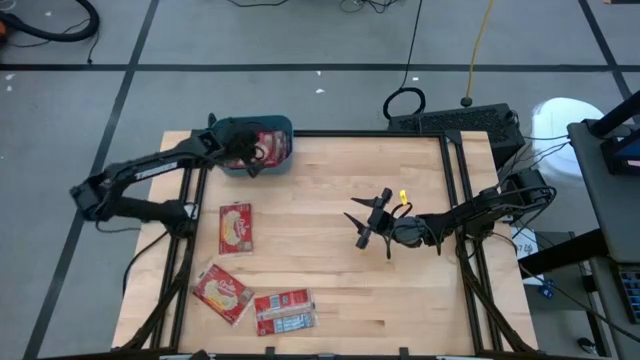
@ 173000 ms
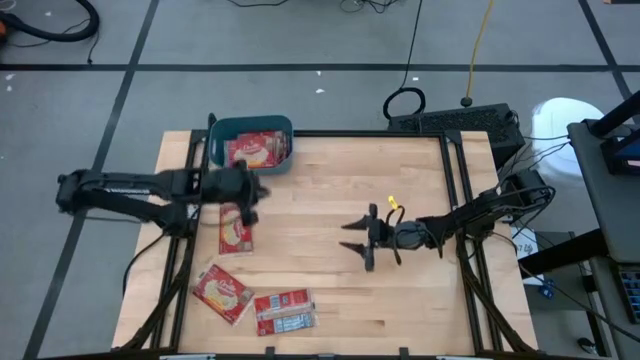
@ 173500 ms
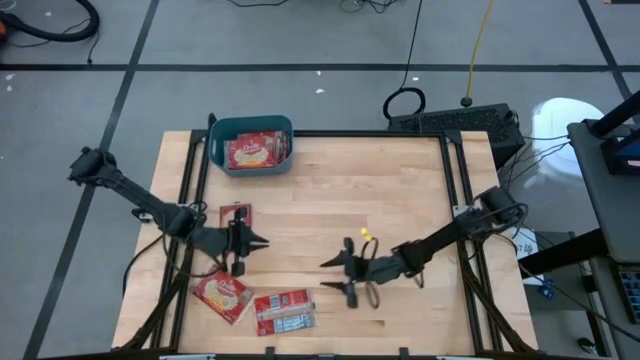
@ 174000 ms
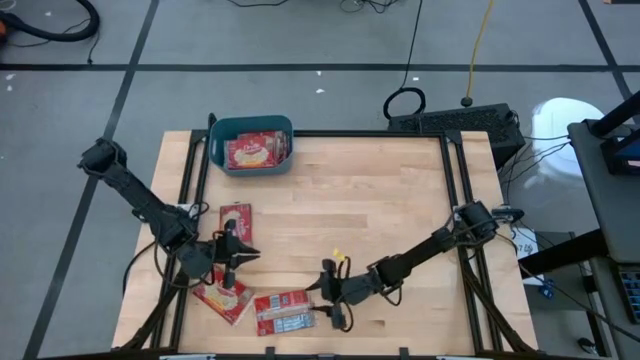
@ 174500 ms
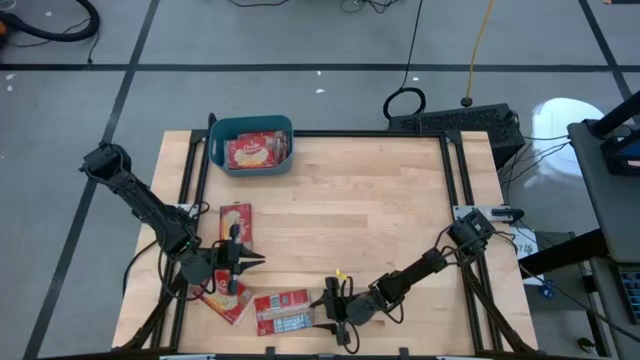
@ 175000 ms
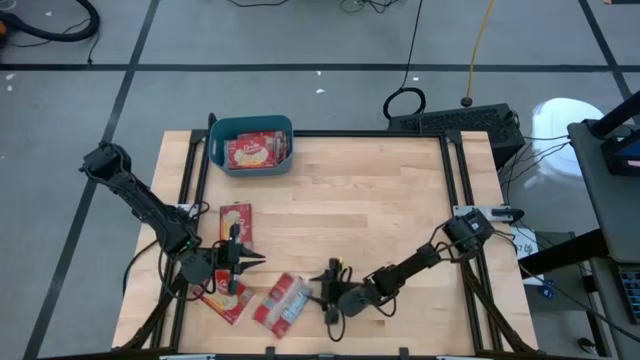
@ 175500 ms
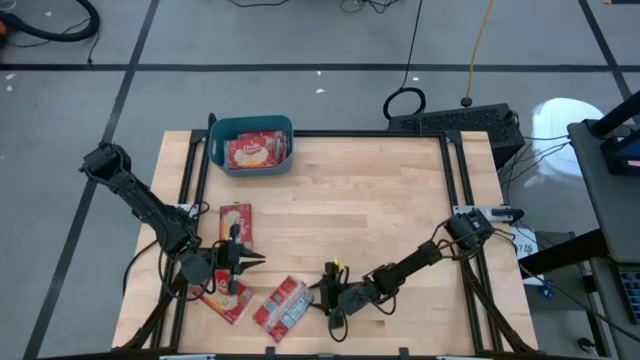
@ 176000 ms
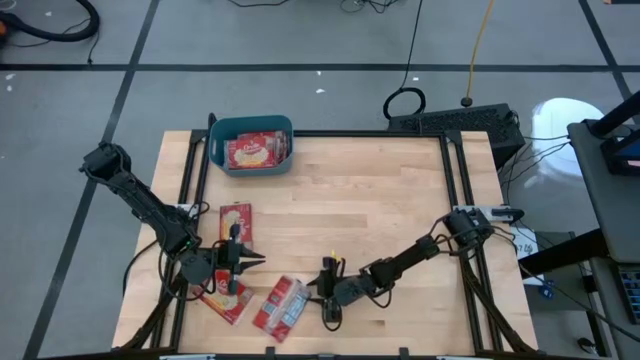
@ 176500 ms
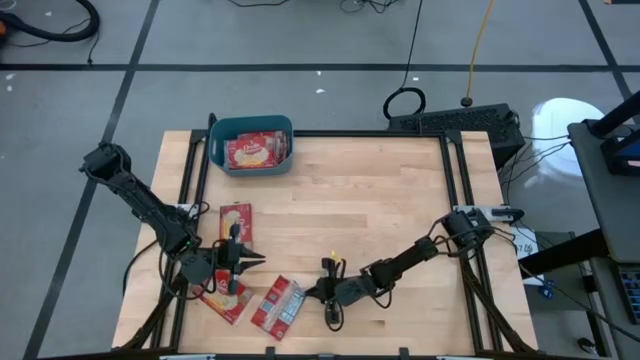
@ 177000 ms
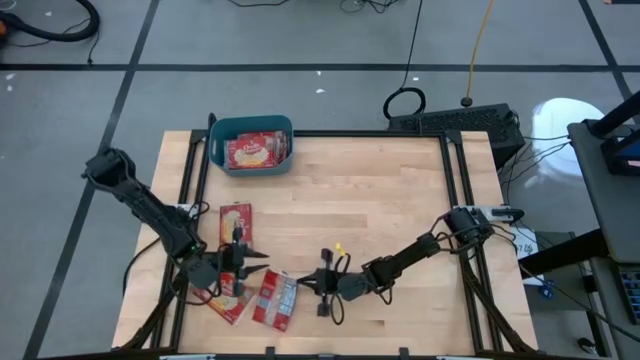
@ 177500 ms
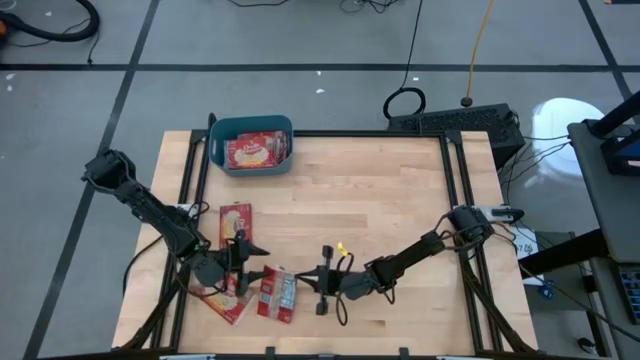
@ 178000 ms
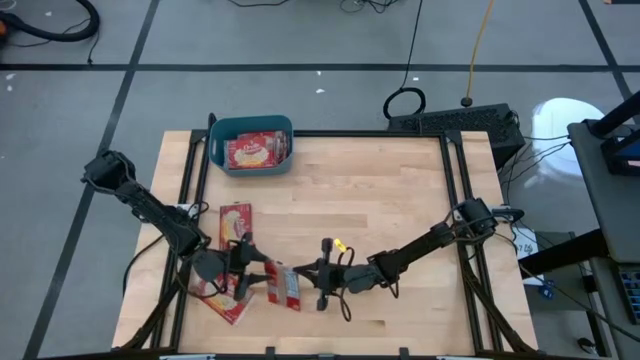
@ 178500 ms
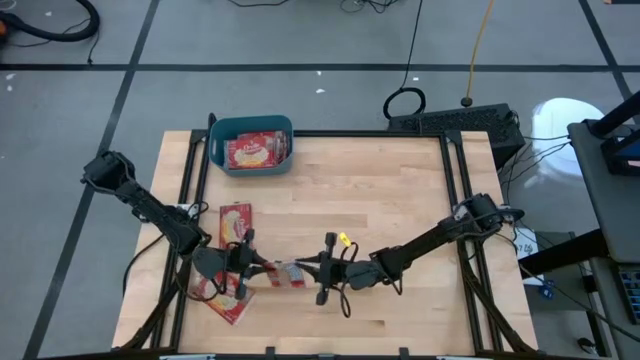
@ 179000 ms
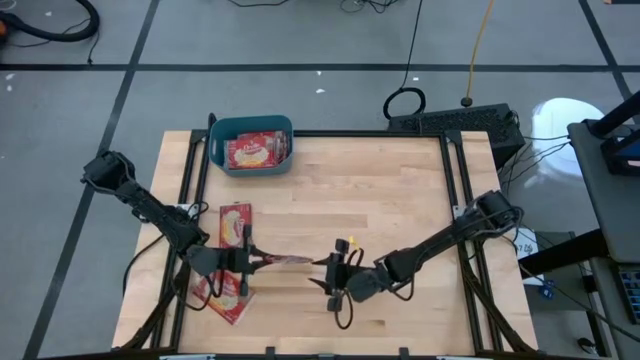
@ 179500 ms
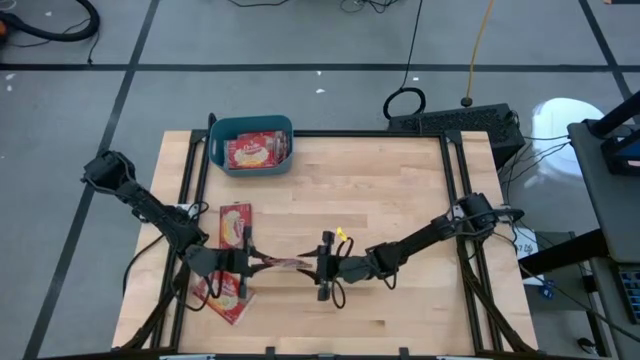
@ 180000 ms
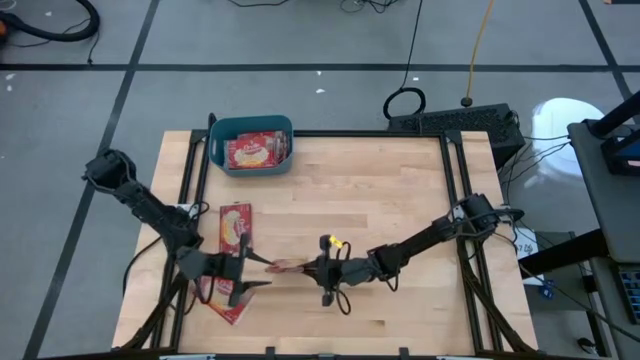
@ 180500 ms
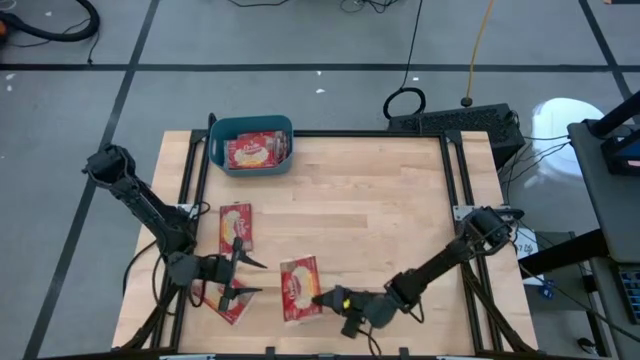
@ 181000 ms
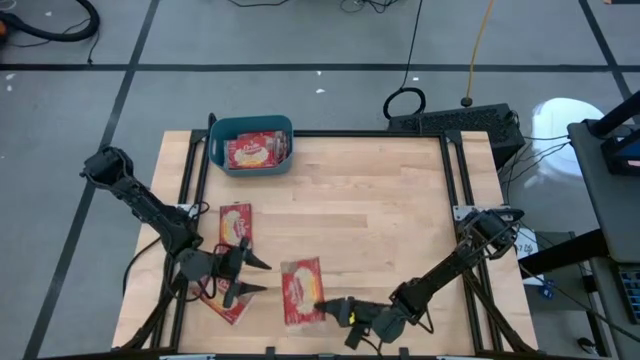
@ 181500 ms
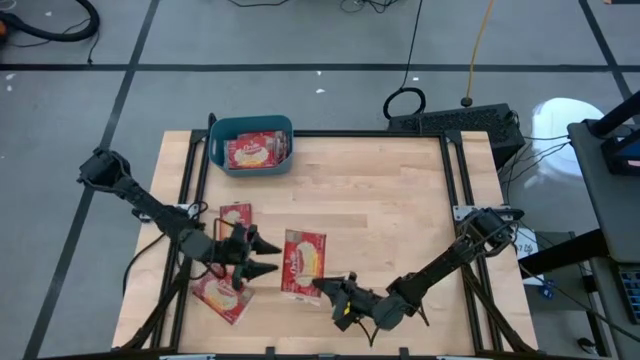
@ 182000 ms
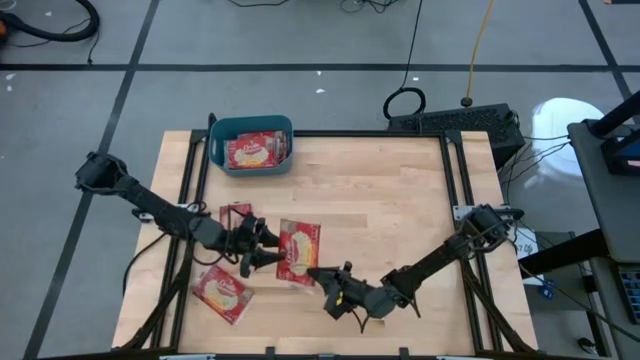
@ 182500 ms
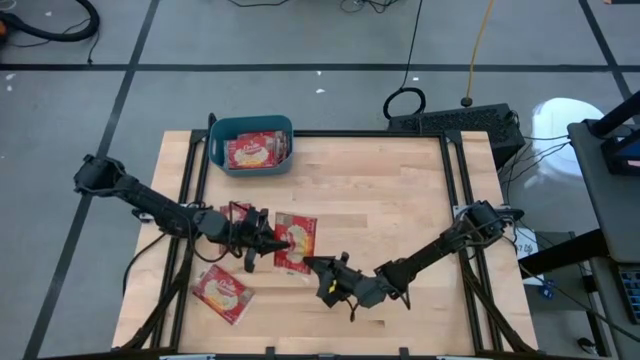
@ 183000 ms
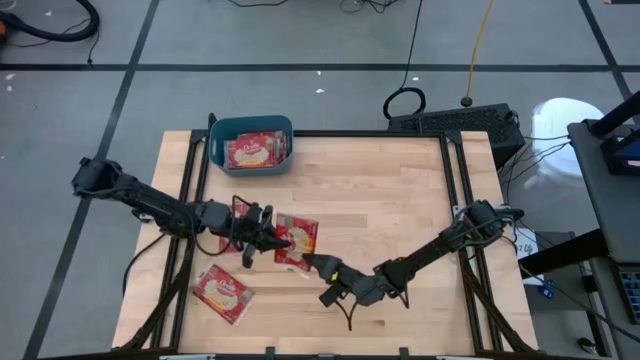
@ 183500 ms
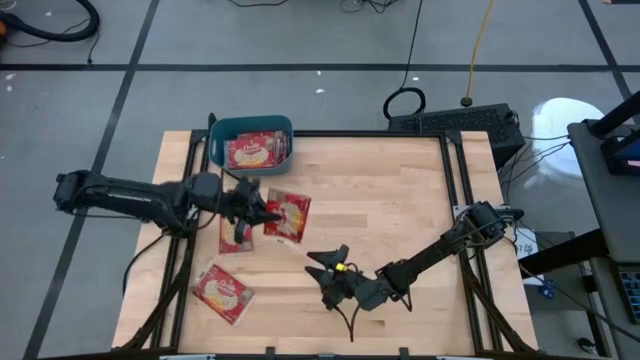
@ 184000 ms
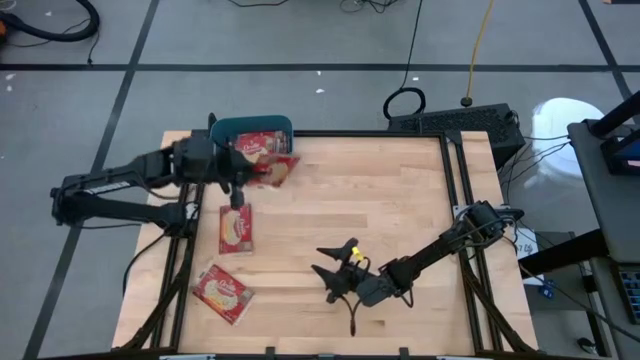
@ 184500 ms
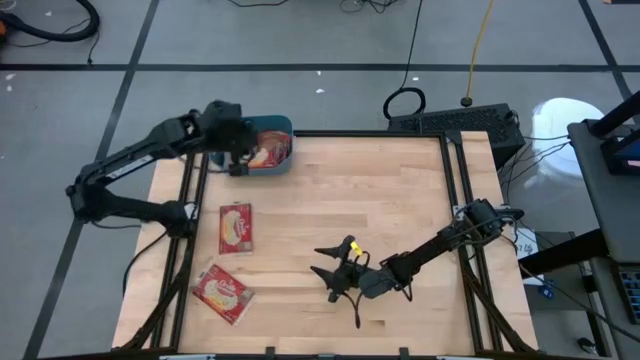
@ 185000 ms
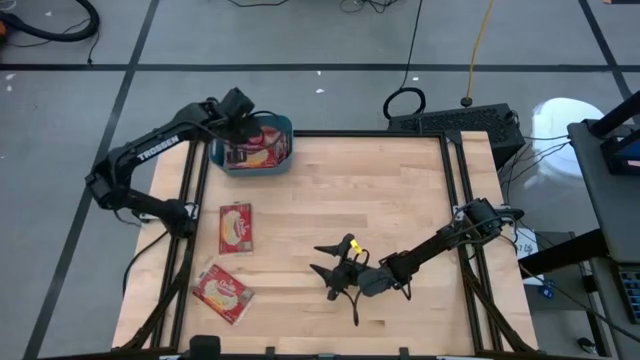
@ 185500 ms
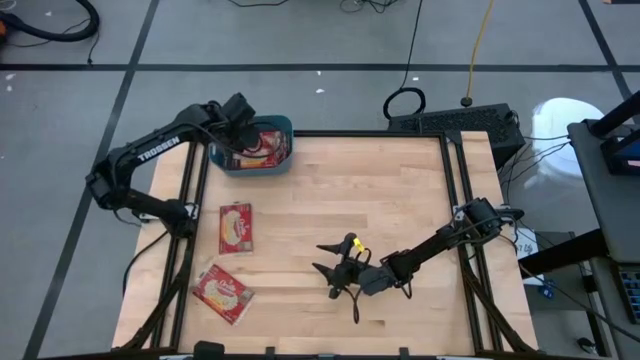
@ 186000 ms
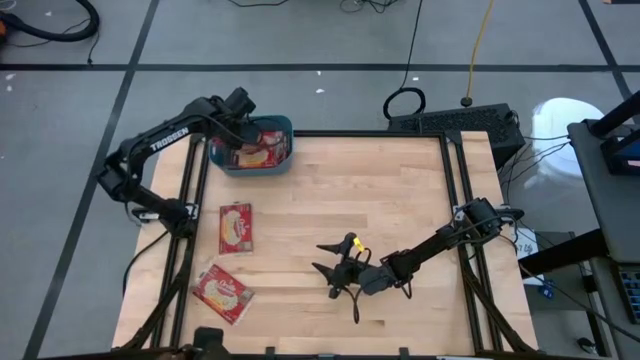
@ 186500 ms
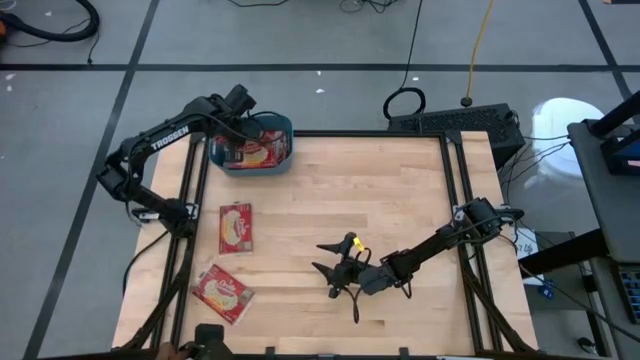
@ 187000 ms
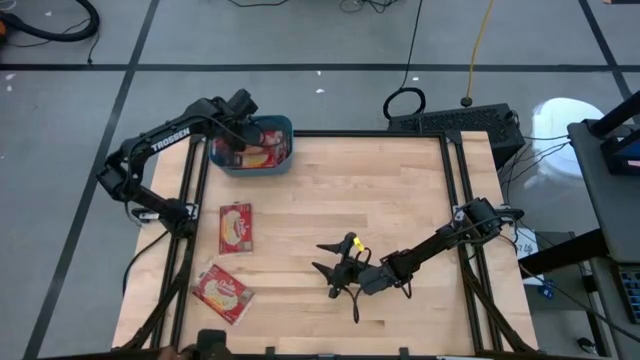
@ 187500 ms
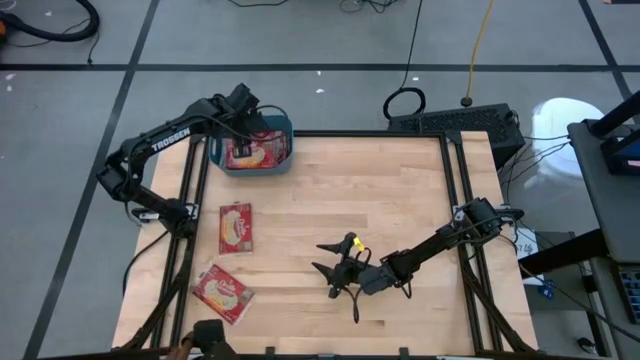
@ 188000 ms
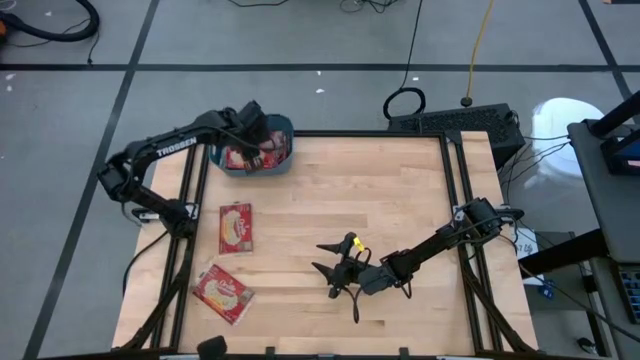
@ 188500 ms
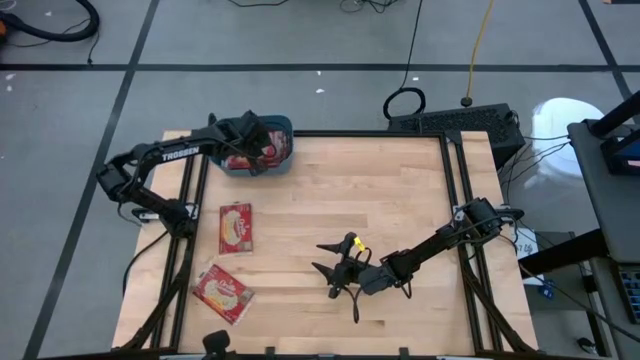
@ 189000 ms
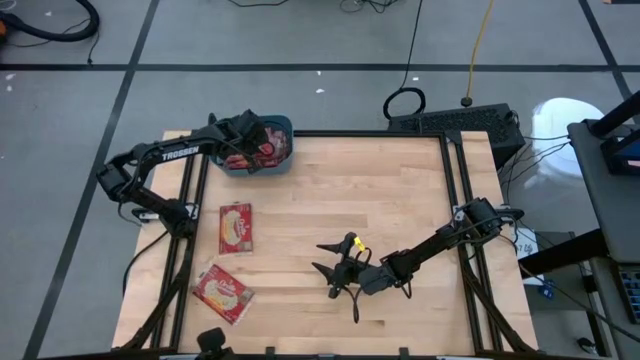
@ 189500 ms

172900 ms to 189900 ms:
Task: Sort popcorn bags into baskets
Put the red popcorn bag into the blue bin

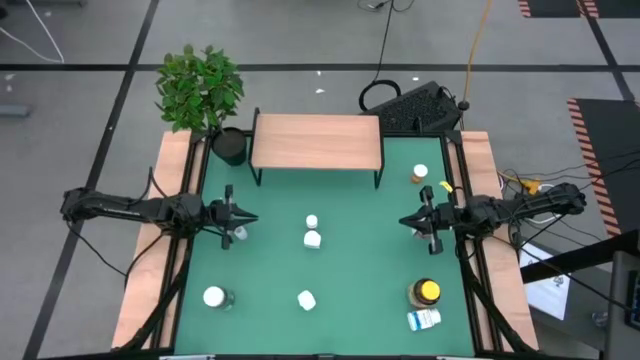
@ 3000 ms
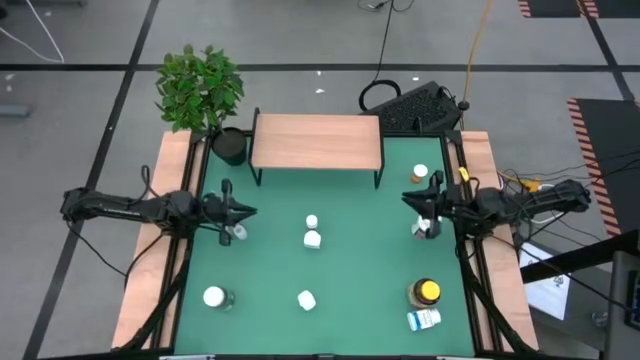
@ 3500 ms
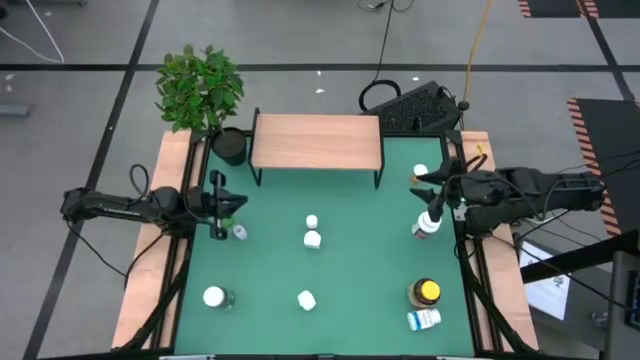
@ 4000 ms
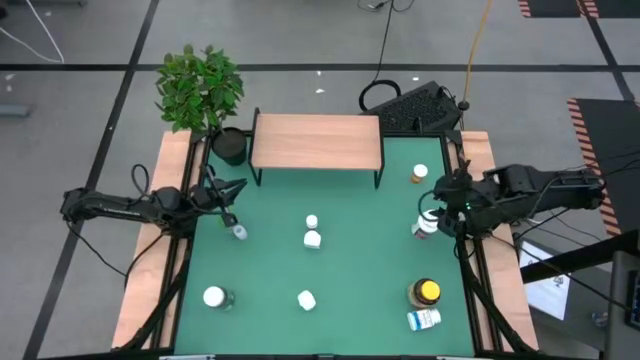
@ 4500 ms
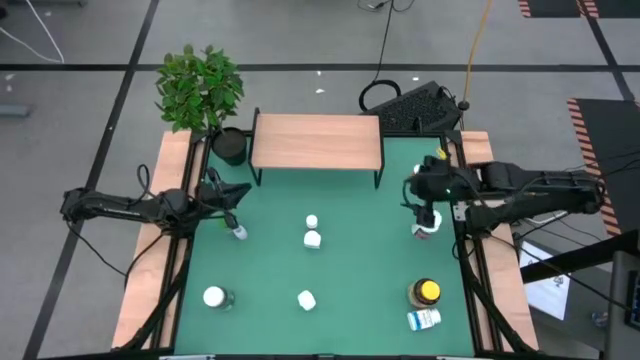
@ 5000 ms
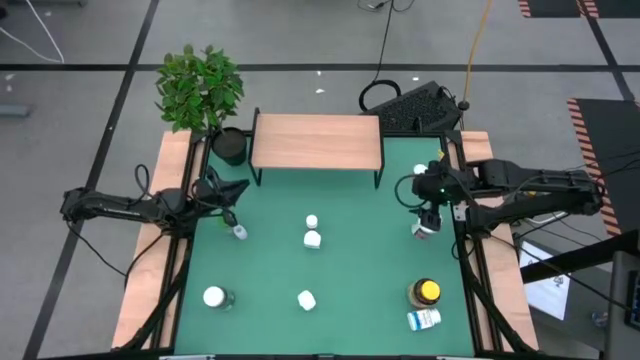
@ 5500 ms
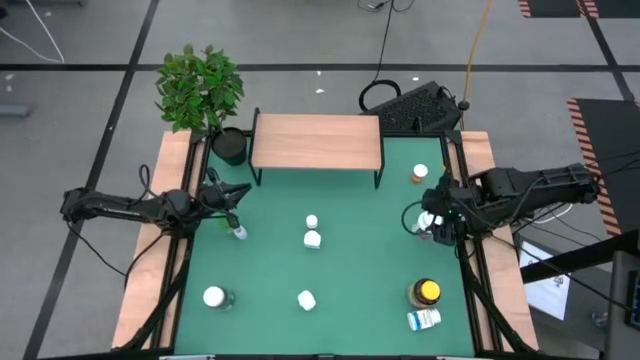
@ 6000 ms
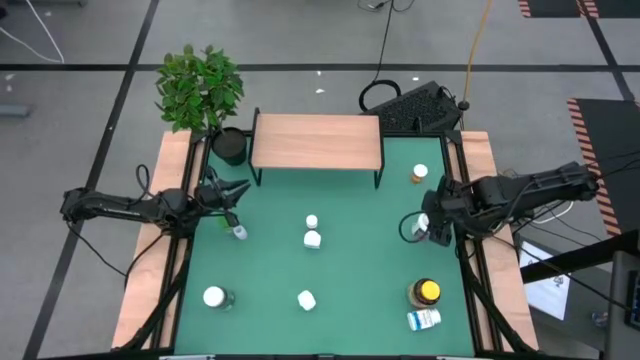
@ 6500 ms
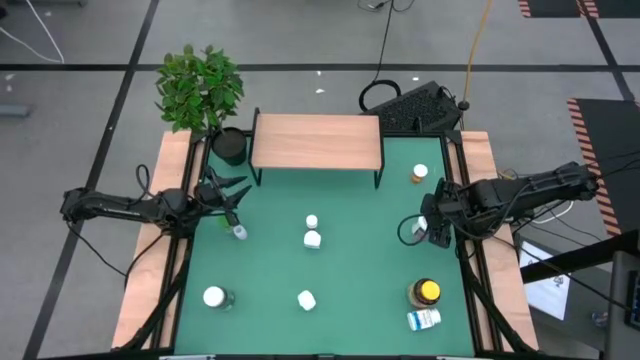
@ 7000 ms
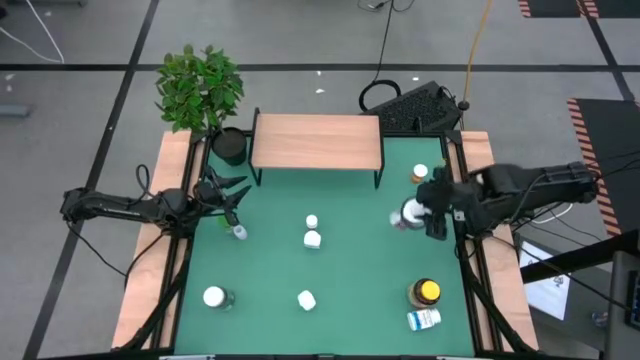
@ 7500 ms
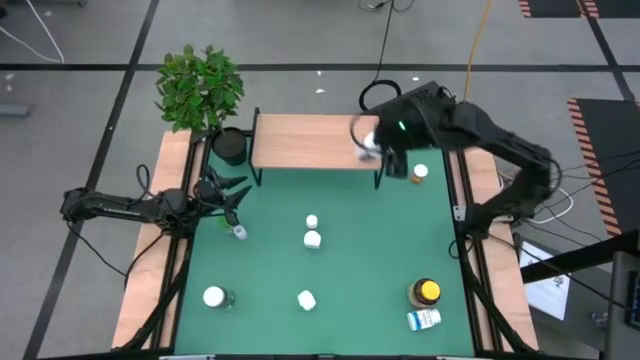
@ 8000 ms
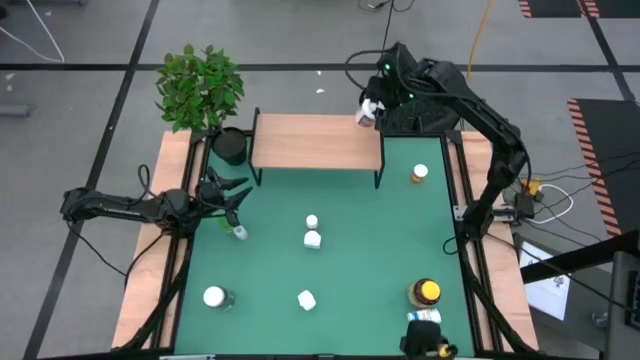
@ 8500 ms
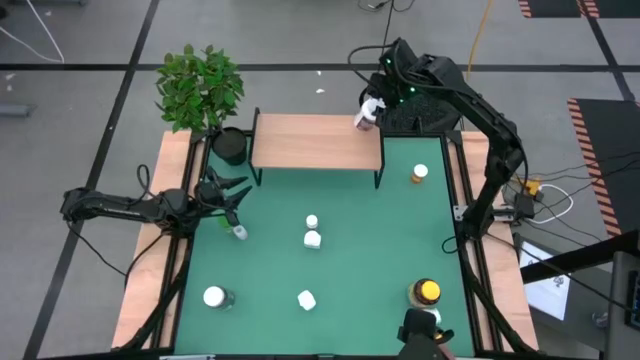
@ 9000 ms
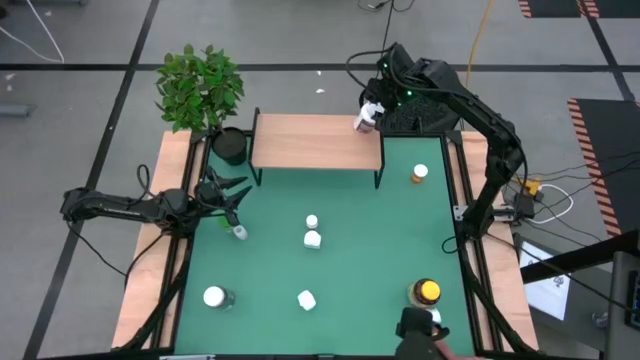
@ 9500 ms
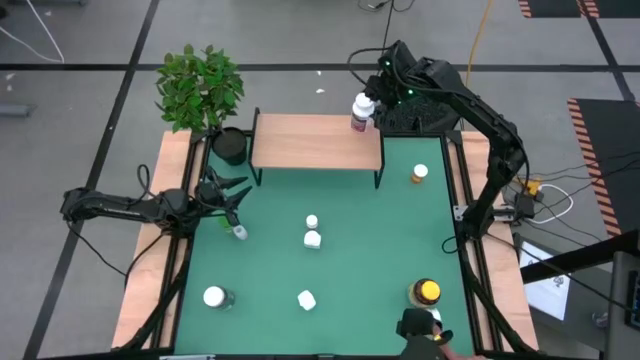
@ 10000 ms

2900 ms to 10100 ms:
Task: Pick and place medicine bottles onto shelf by color
Put the red and white pill bottle on the shelf
